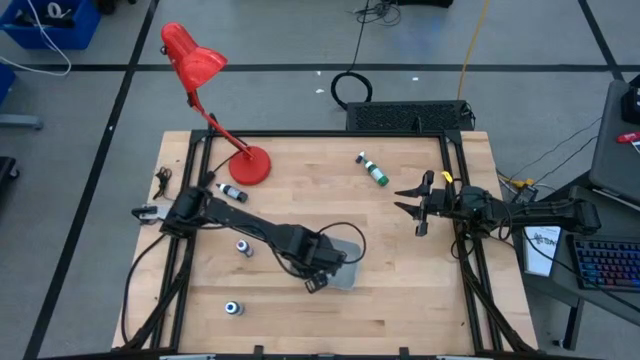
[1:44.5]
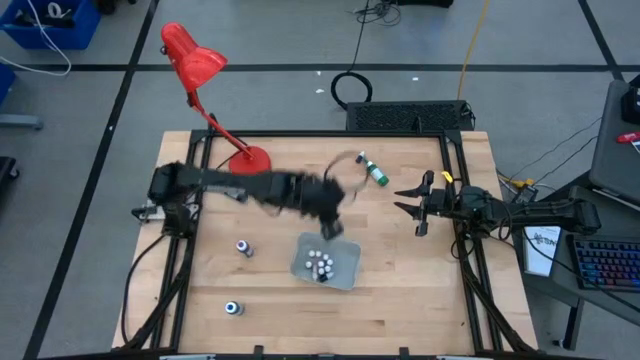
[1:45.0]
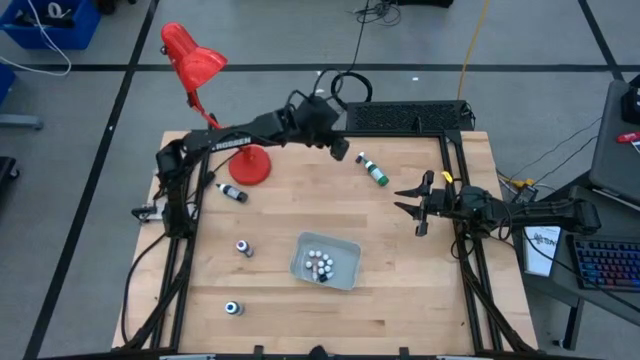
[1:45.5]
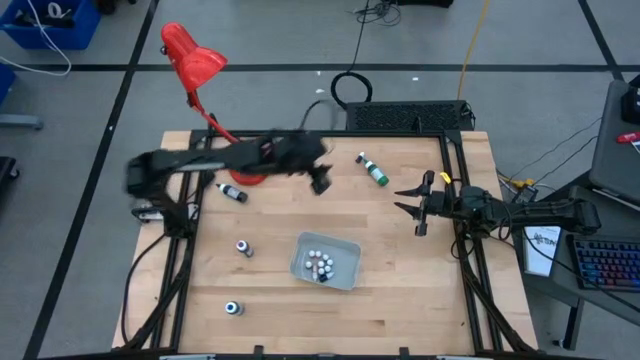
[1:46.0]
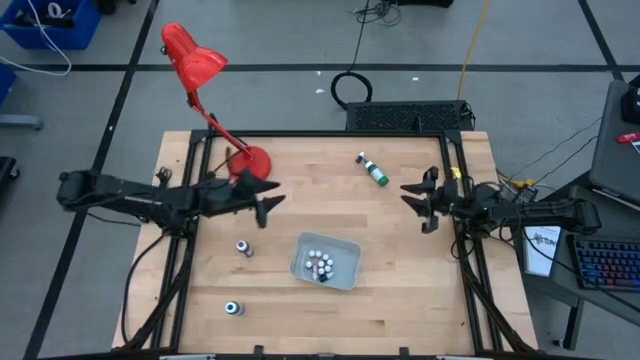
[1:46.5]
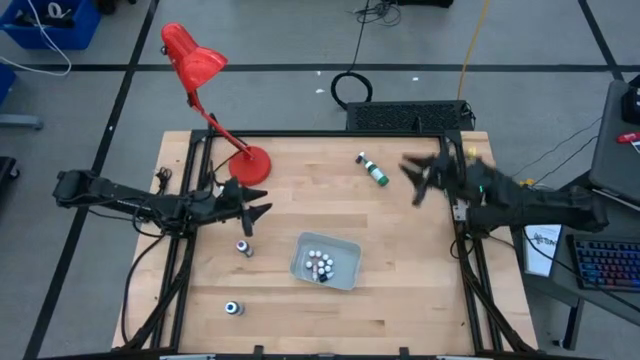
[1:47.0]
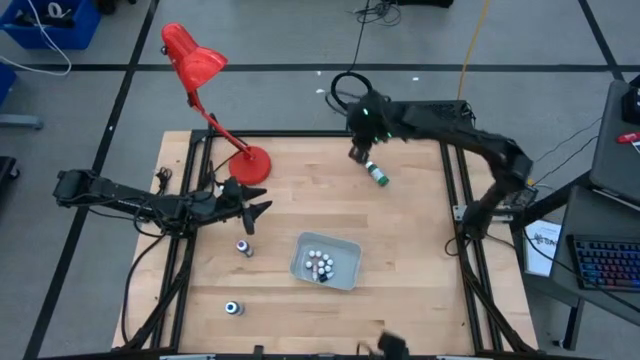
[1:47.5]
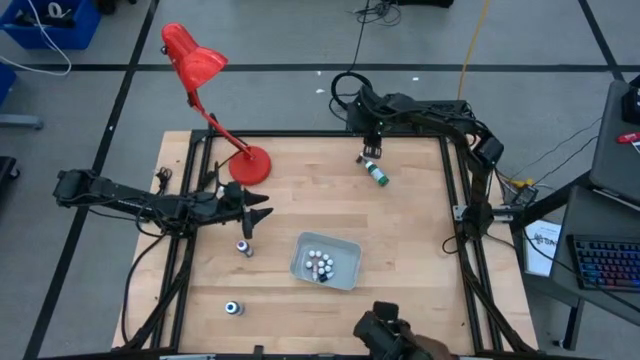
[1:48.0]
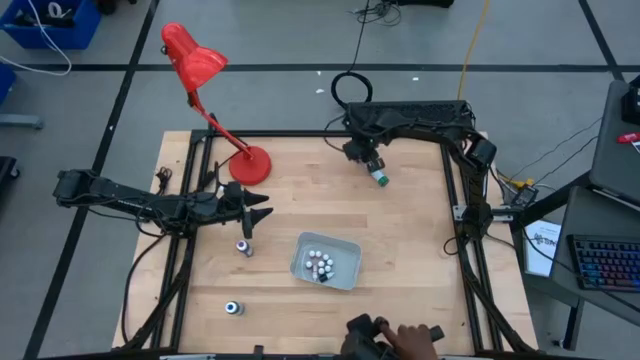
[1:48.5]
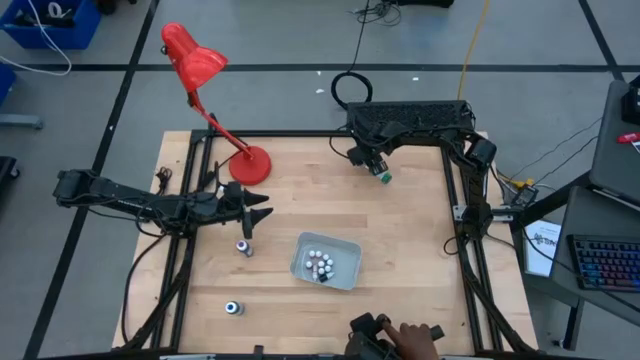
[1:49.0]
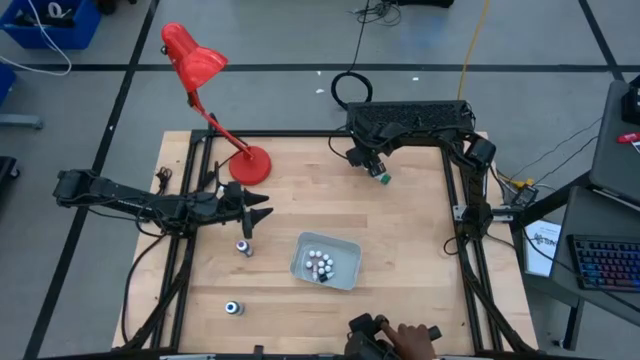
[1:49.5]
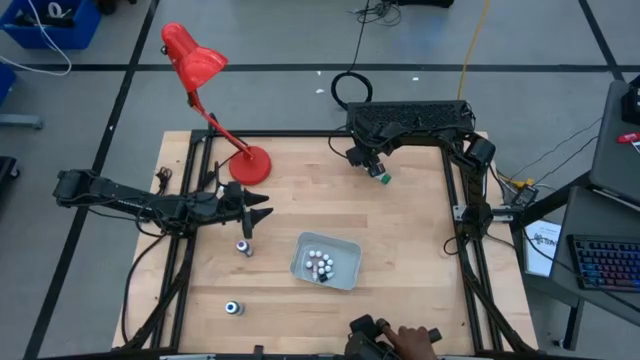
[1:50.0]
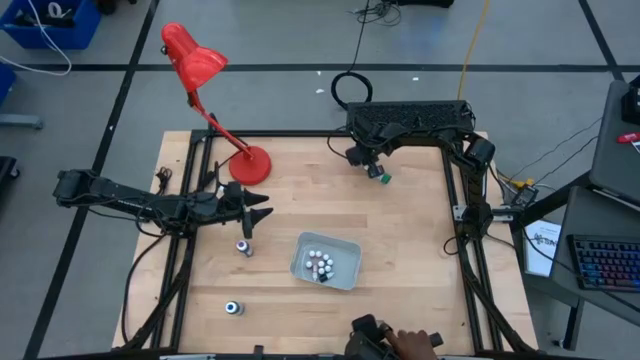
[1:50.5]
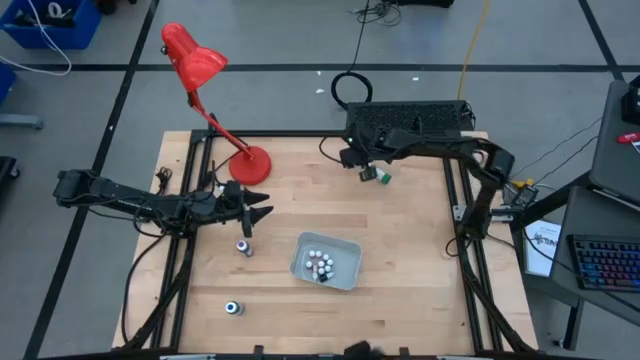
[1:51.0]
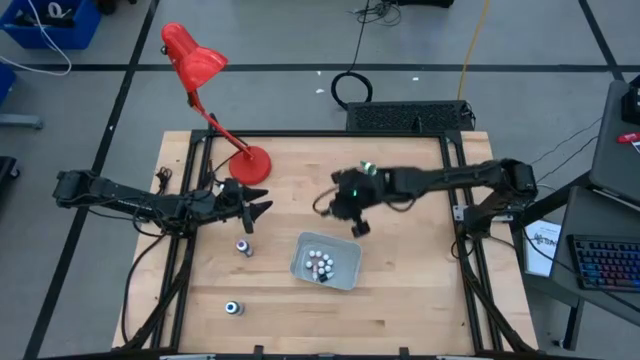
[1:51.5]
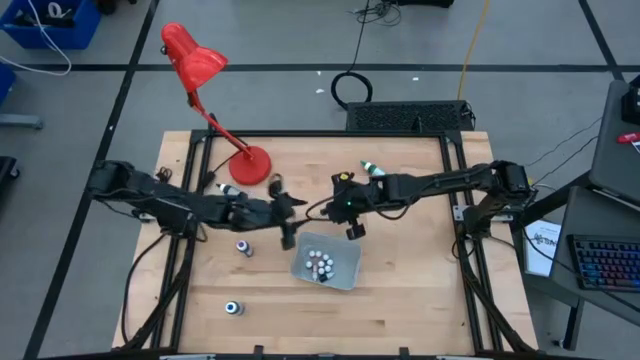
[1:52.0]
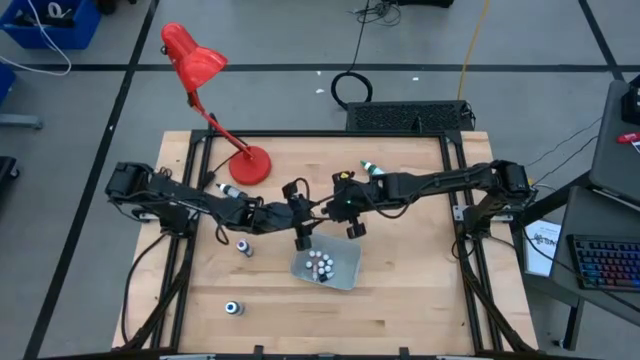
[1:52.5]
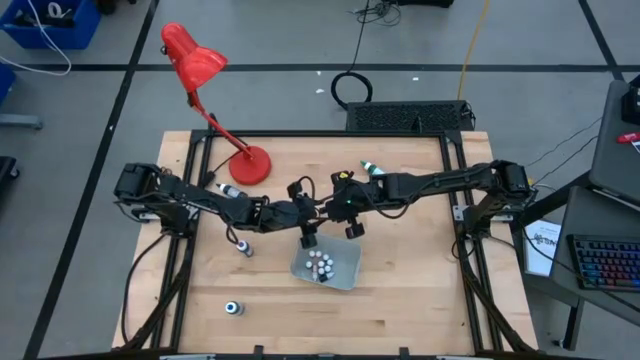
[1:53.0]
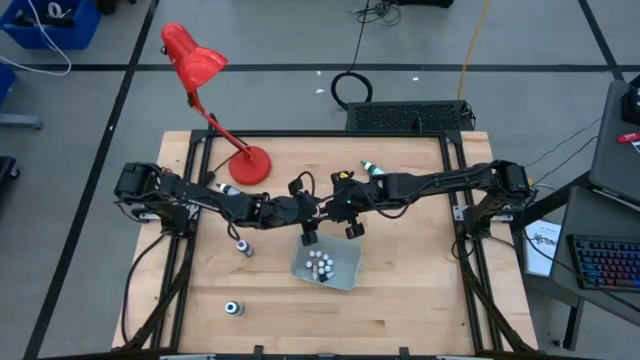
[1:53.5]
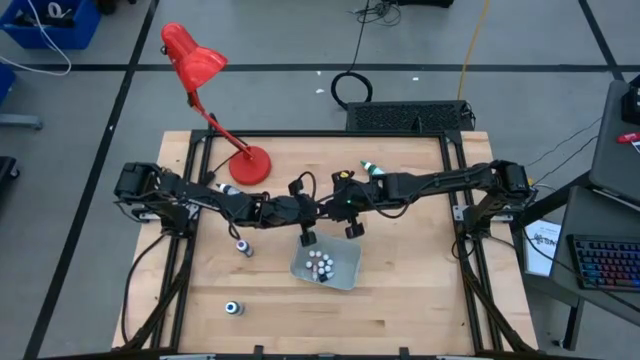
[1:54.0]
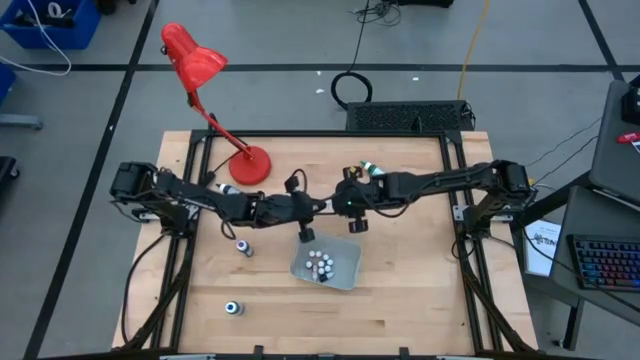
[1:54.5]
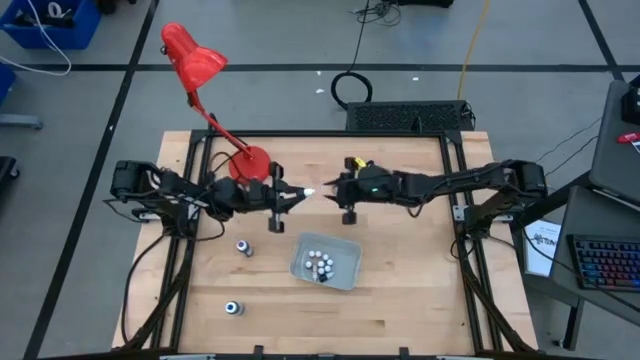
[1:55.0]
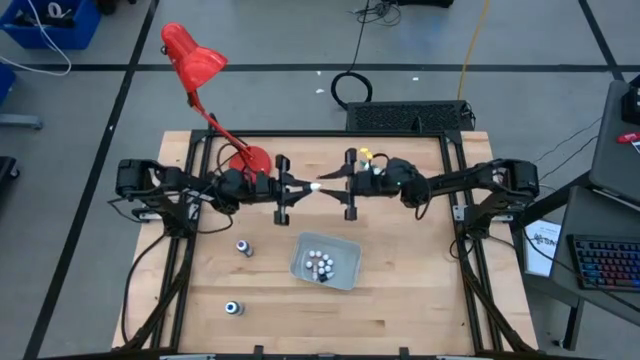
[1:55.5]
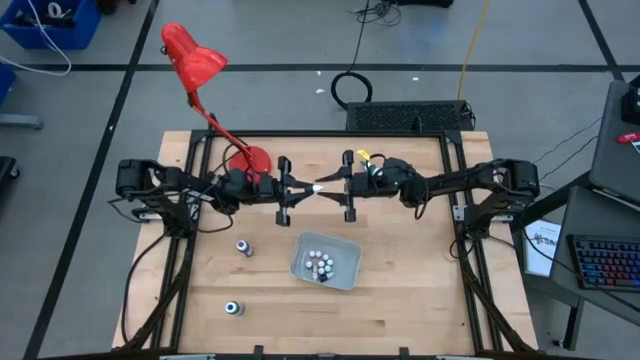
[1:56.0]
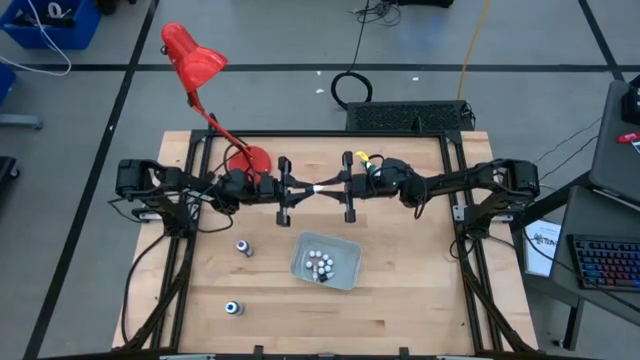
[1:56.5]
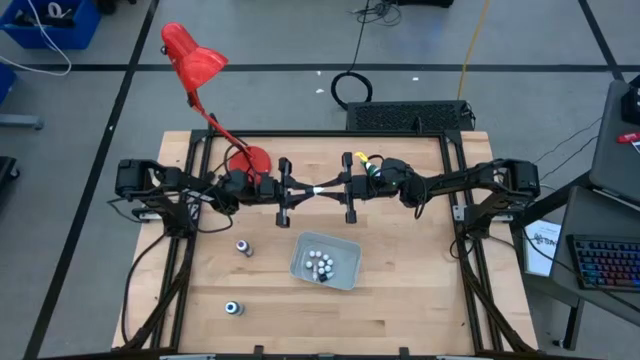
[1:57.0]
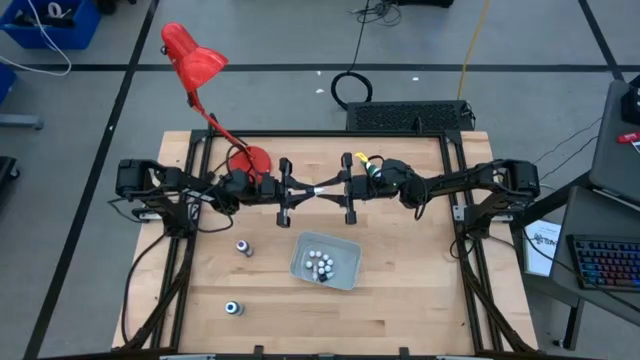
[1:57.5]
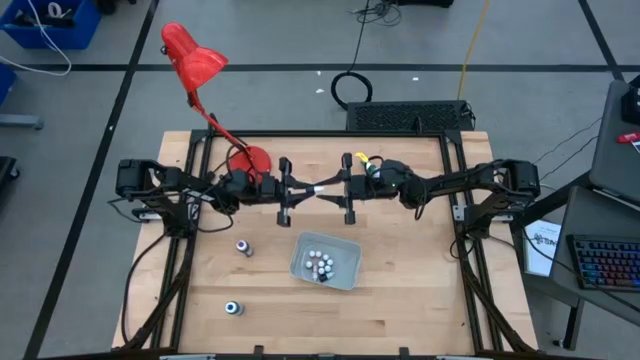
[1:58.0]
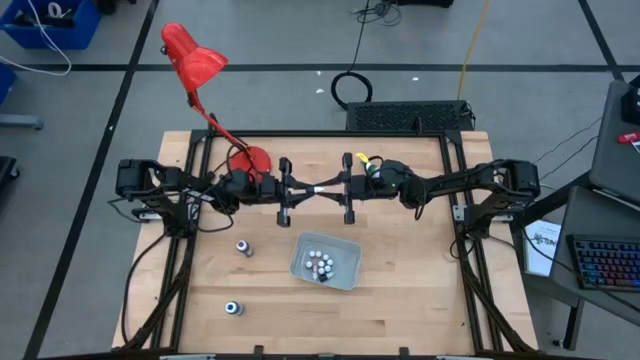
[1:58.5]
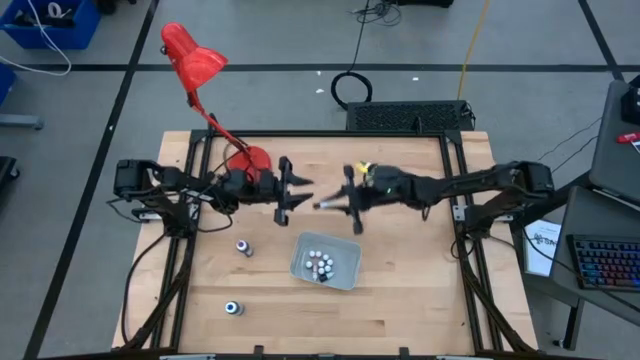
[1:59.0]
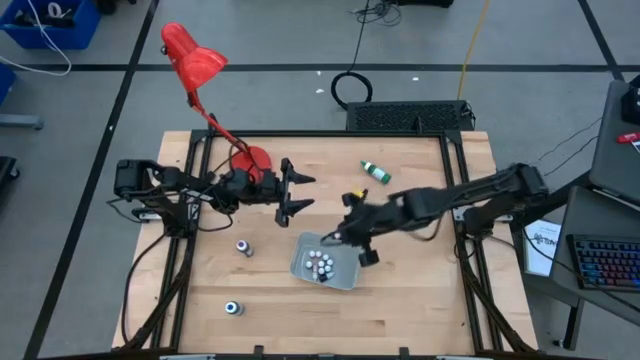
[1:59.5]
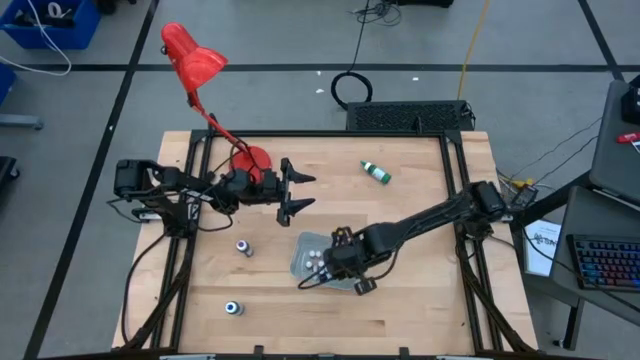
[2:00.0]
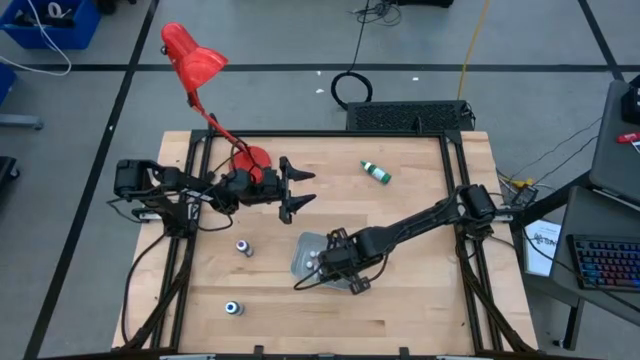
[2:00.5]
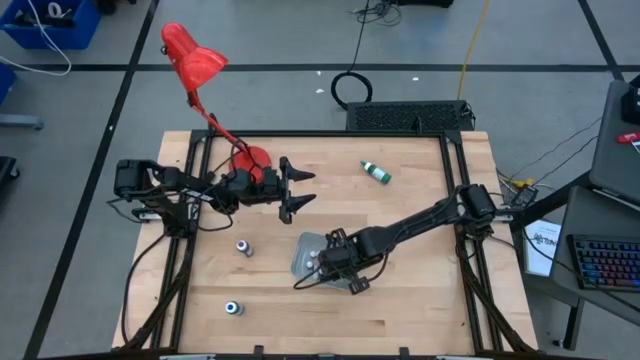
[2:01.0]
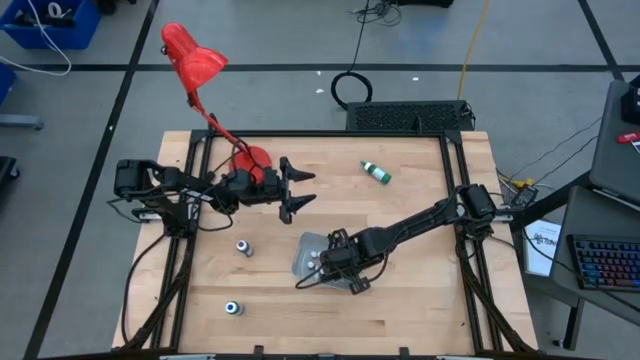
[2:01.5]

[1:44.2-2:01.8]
Task: Pick & Place food coloring
Put the small purple food coloring bottle into the gray bin

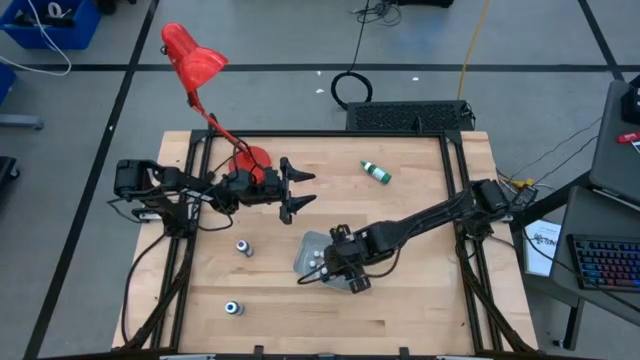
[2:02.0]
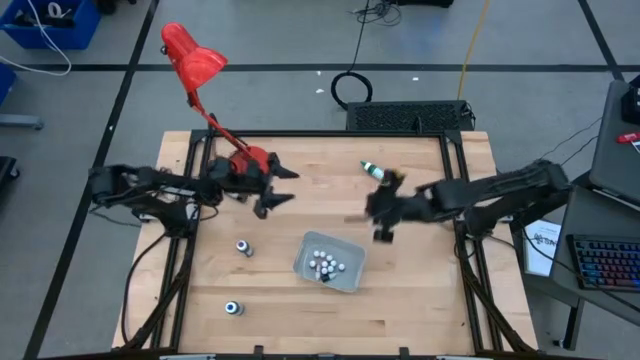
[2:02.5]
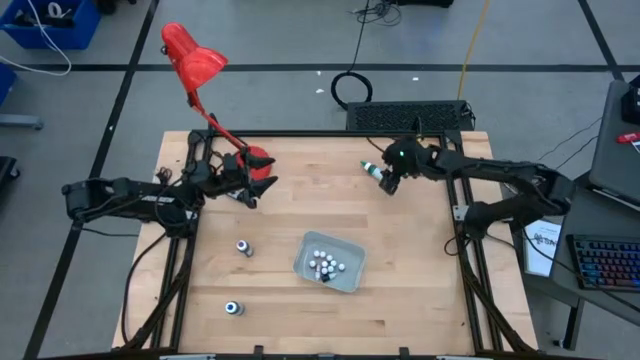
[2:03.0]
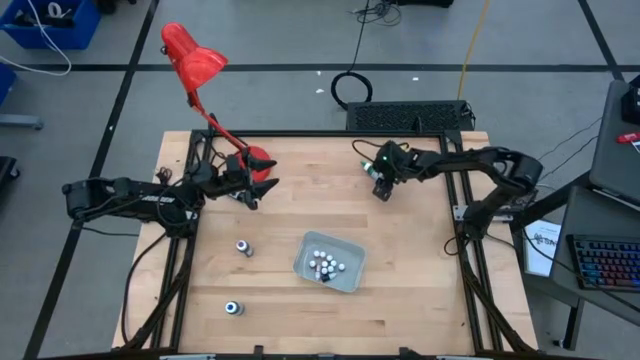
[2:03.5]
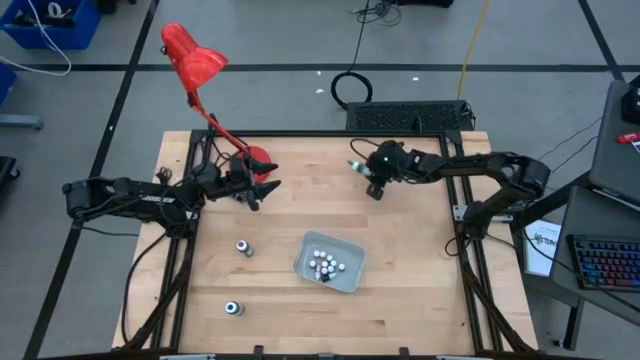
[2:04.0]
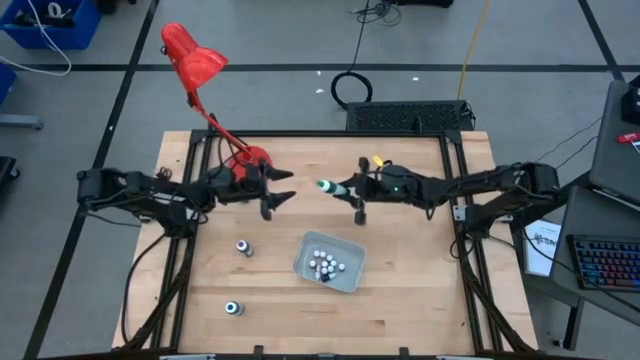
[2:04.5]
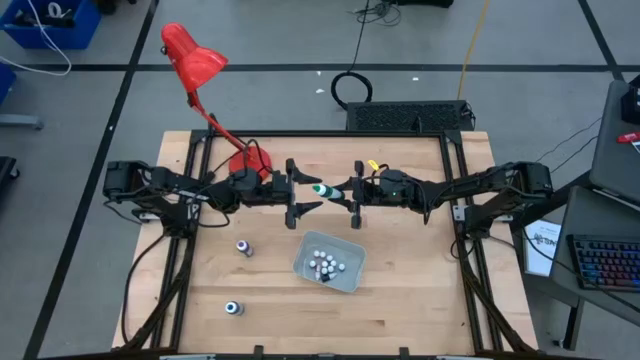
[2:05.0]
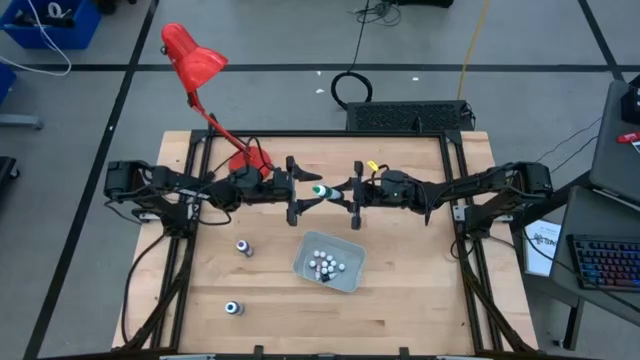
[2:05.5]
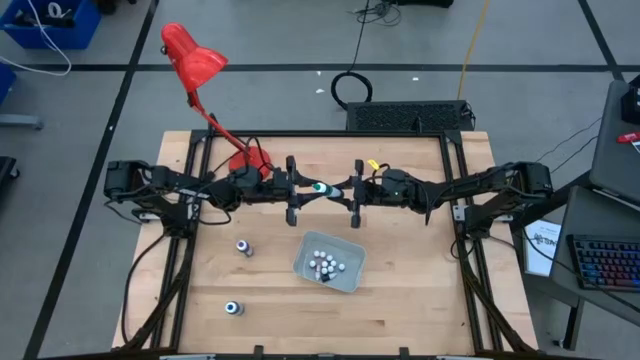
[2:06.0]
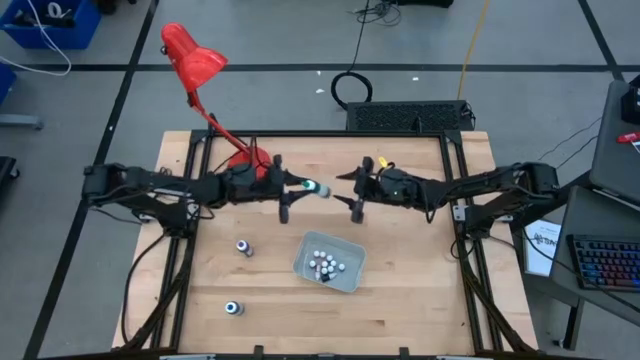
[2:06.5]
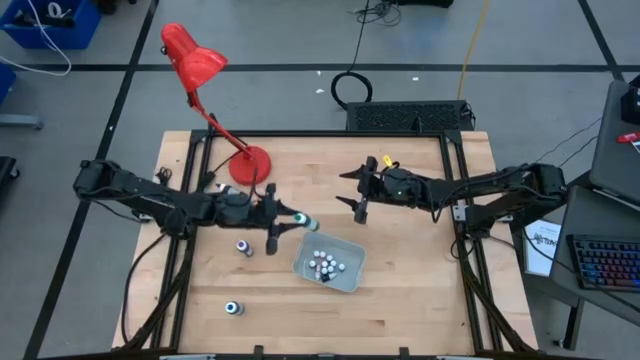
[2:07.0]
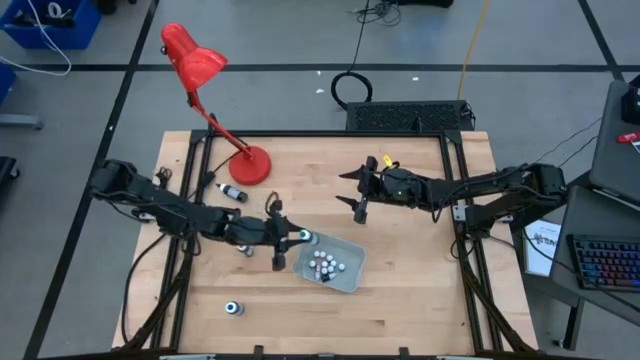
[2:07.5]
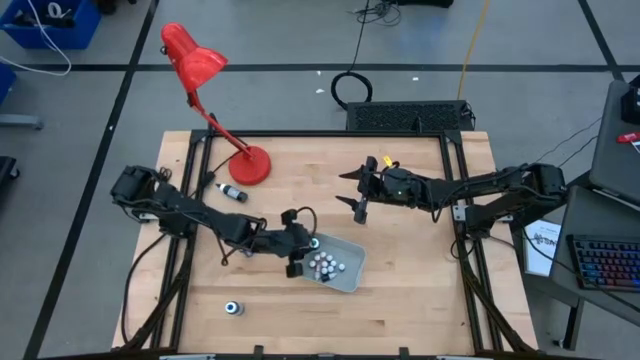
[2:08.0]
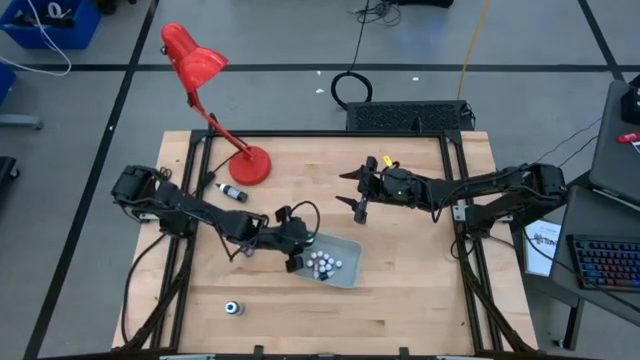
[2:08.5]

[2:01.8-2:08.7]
Put the large green food coloring bottle into the gray bin
